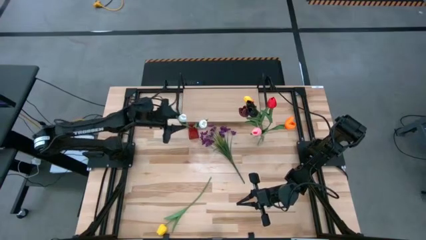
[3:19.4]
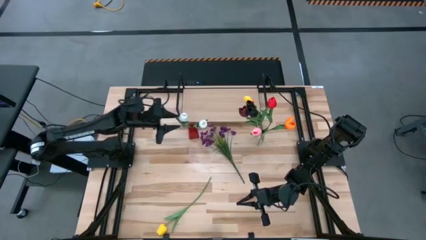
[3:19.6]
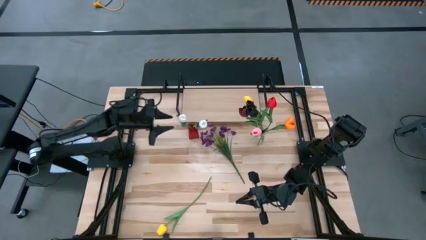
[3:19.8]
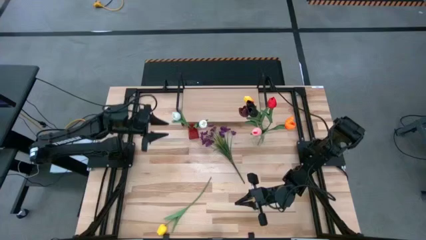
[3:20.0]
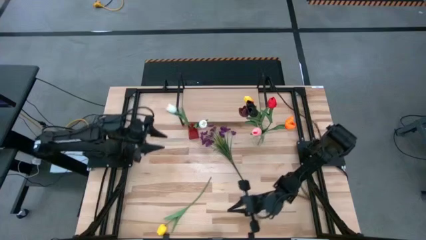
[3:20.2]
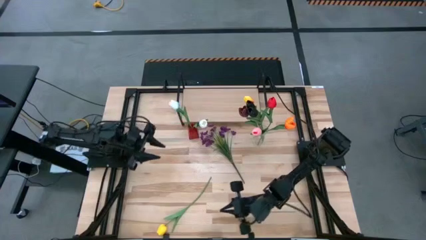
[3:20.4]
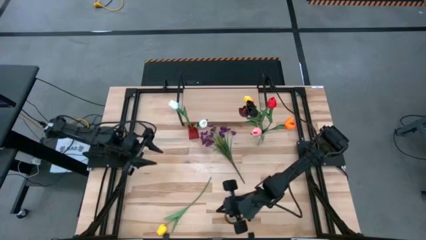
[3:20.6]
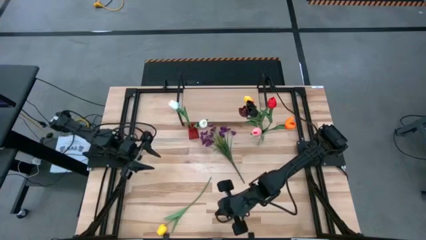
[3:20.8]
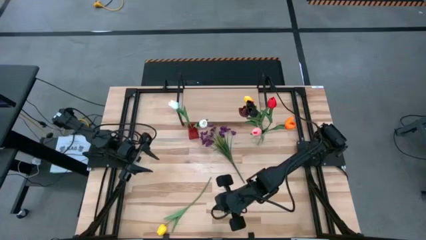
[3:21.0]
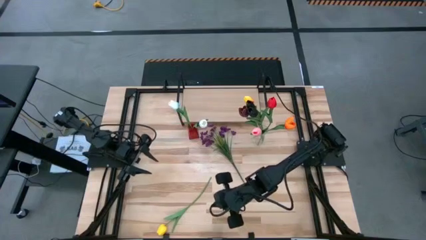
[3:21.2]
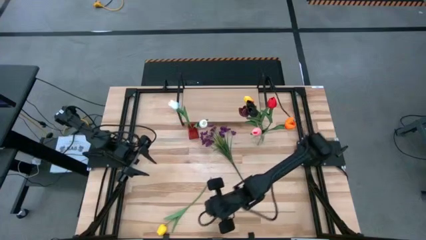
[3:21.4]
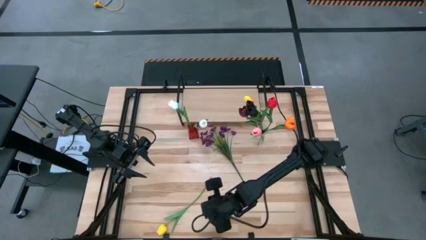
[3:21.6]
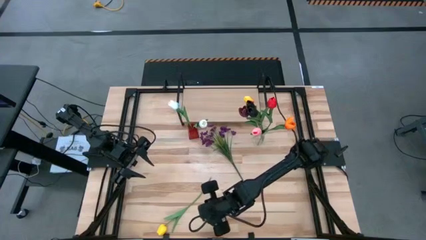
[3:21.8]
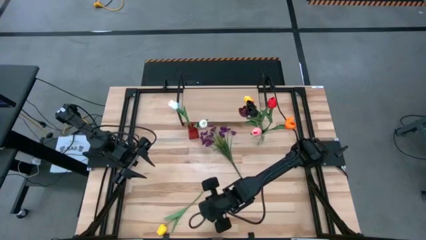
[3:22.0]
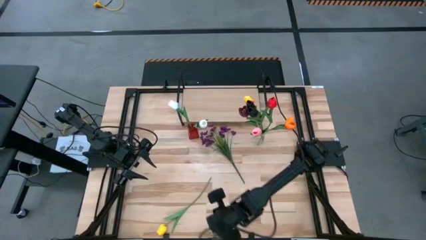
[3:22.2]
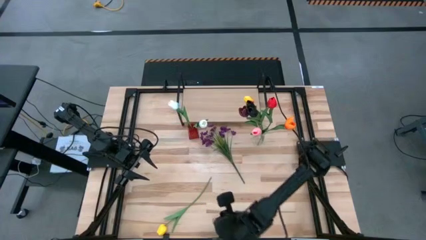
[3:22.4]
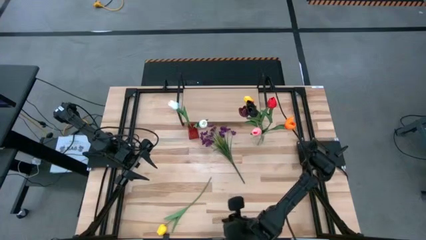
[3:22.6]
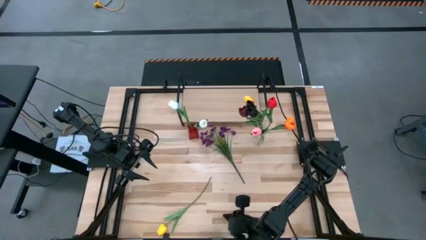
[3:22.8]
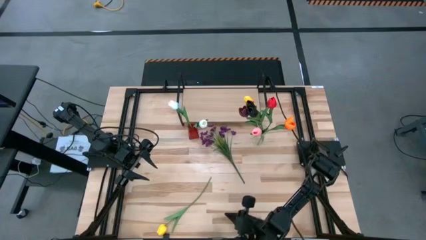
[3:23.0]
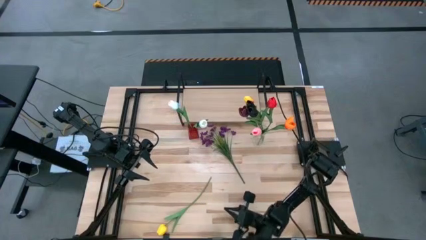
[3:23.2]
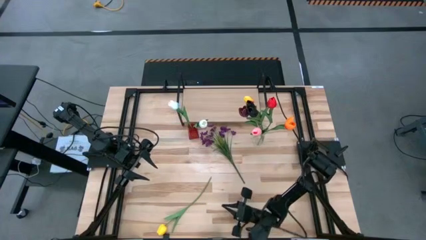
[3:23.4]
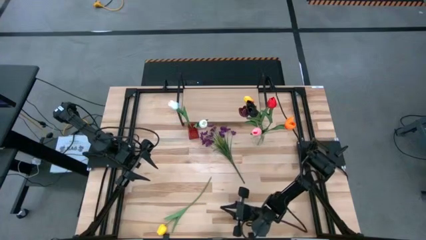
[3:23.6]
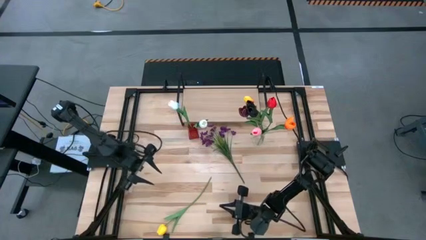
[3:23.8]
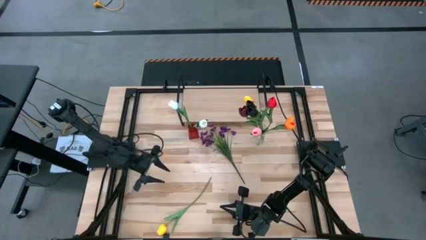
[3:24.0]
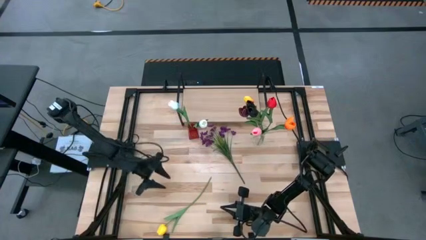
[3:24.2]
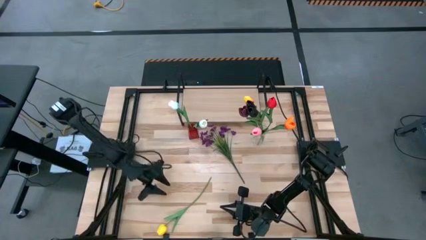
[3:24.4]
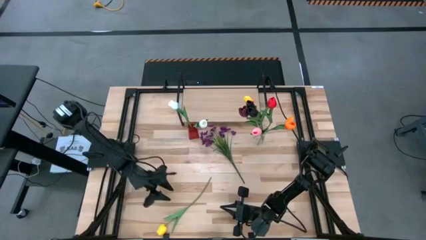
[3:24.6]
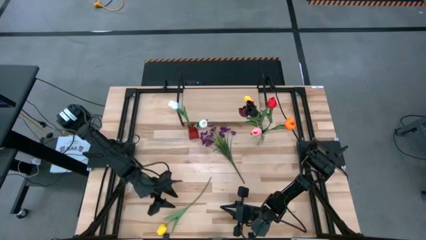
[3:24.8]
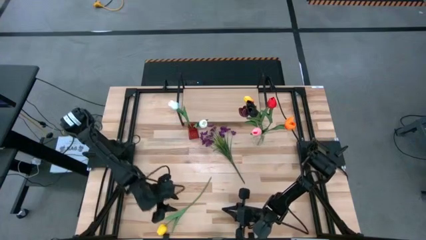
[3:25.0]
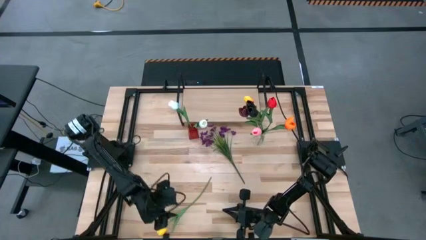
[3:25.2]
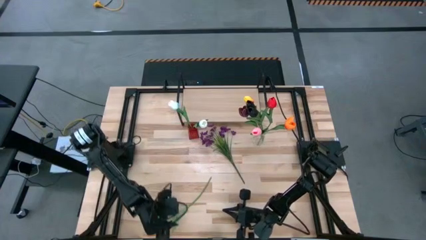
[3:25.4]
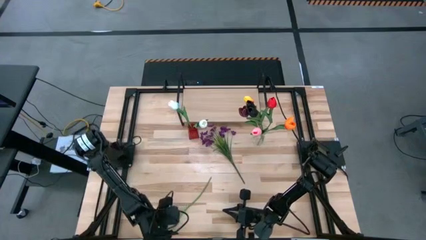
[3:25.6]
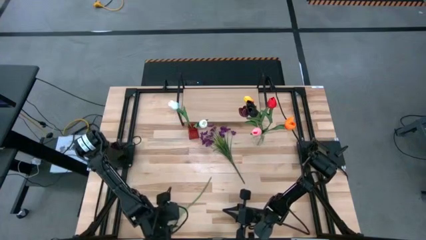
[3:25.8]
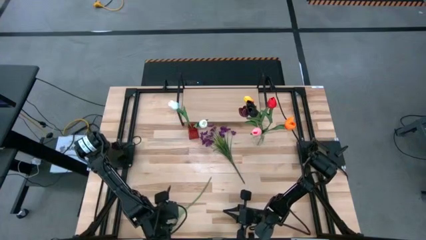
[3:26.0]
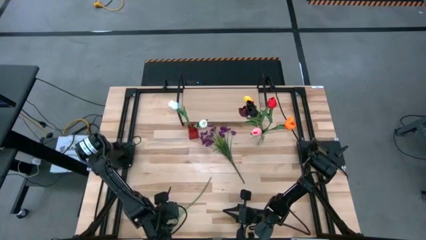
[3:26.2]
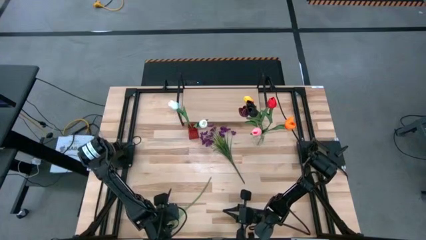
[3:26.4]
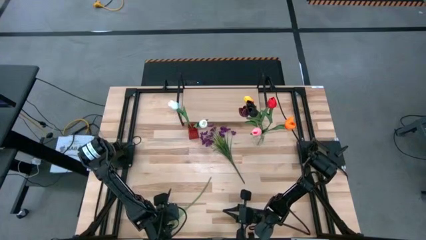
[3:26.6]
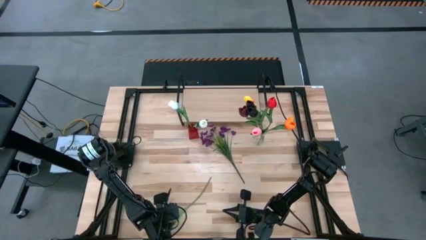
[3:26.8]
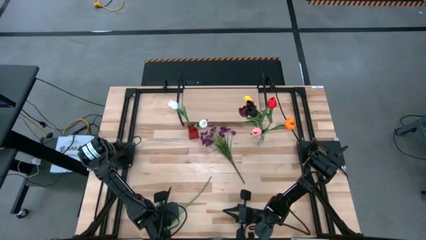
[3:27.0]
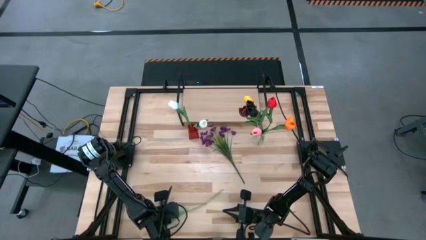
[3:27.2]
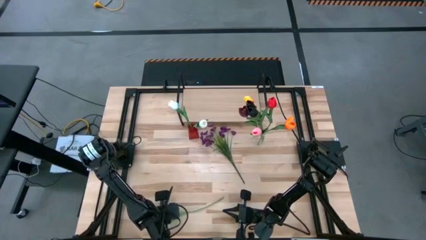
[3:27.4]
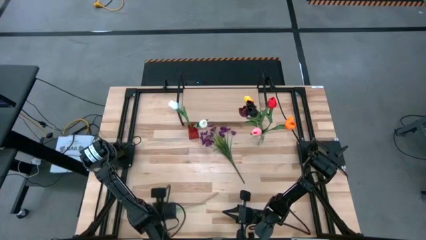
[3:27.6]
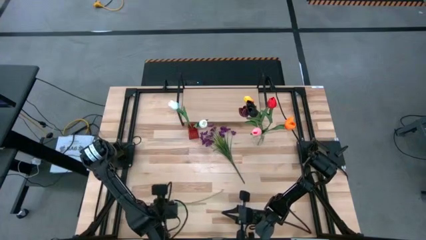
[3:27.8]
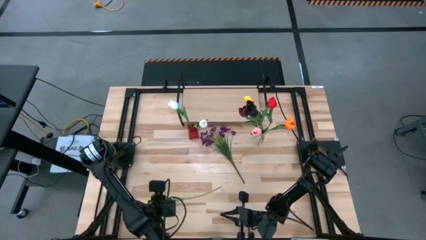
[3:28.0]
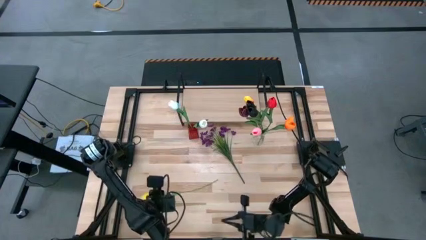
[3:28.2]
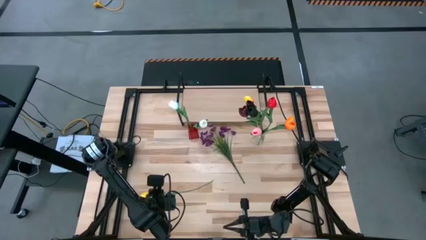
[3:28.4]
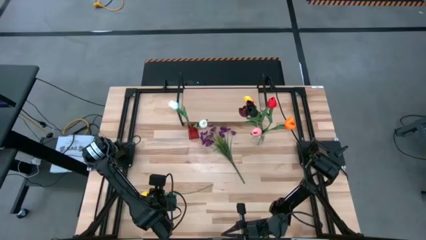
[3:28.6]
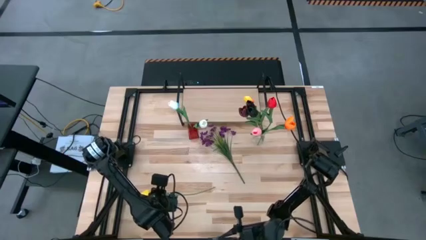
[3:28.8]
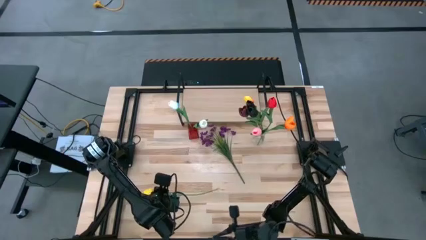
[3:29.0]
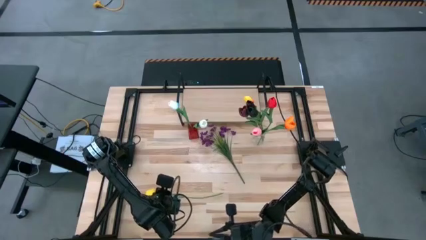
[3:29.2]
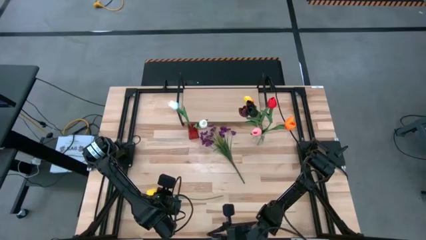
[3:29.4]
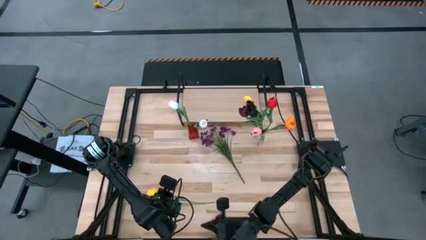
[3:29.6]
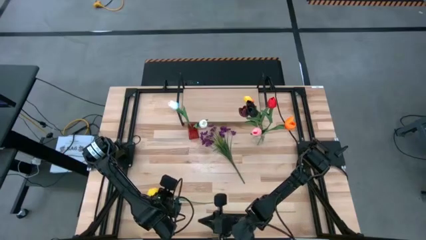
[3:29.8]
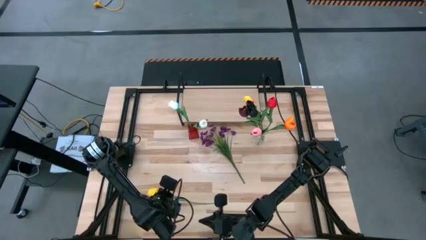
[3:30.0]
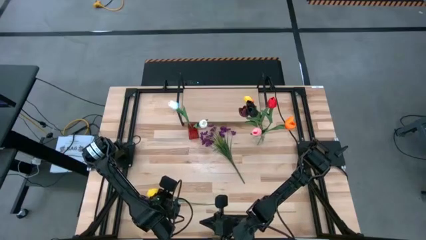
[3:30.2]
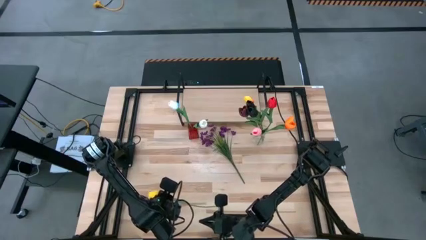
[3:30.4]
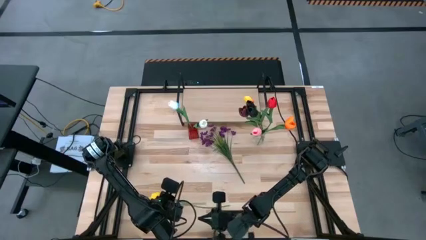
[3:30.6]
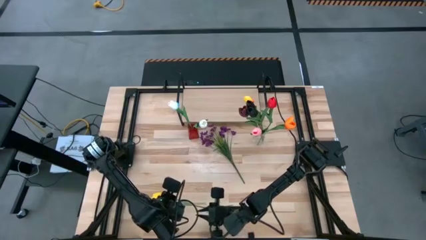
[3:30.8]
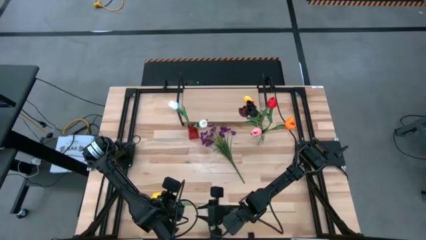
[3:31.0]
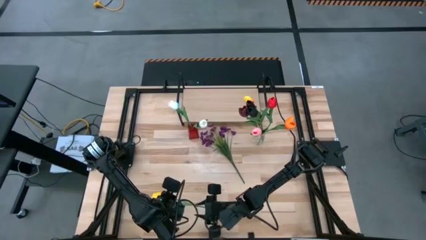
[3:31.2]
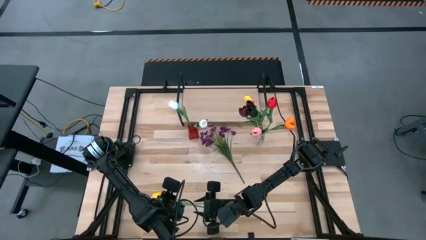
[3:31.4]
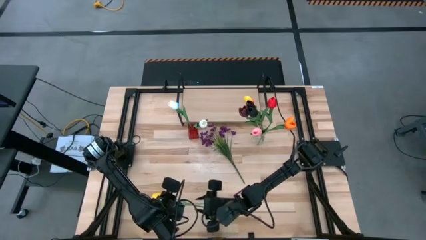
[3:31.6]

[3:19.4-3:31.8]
Task: Pick and place flowers into a vace then onto a shelf
Put the yellow flower into the red vase

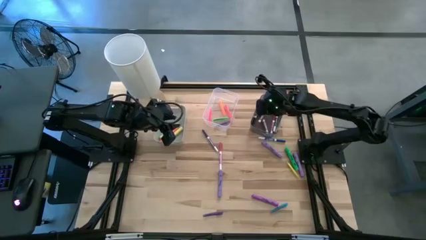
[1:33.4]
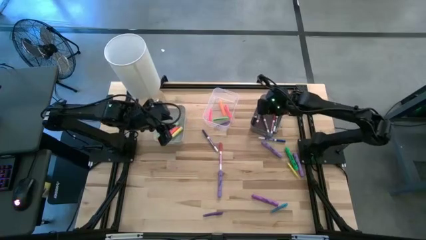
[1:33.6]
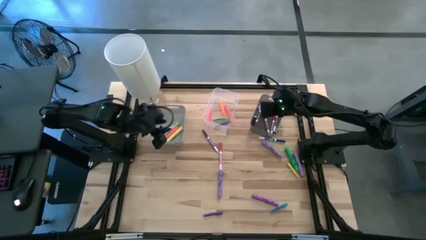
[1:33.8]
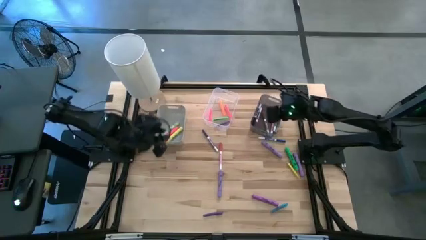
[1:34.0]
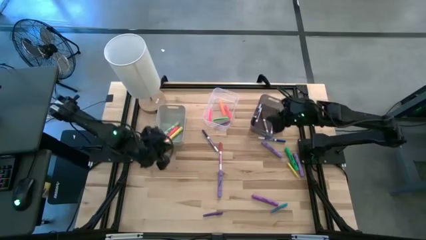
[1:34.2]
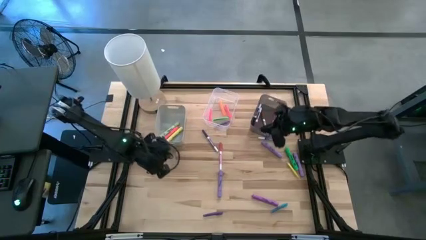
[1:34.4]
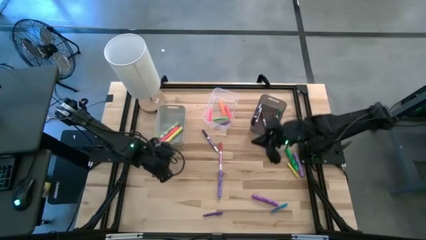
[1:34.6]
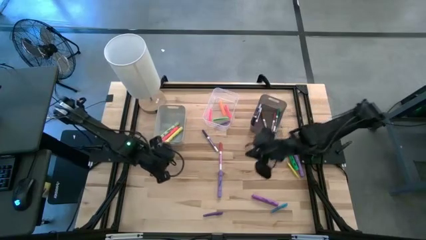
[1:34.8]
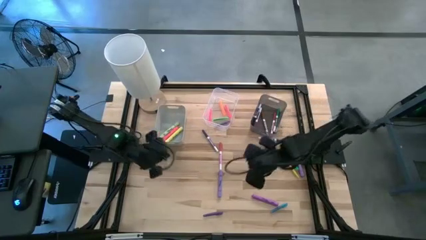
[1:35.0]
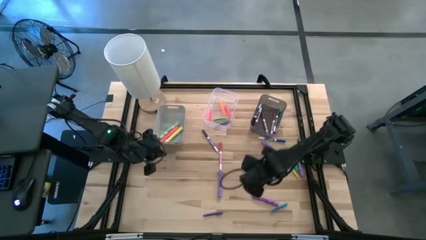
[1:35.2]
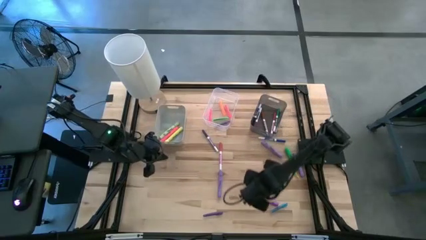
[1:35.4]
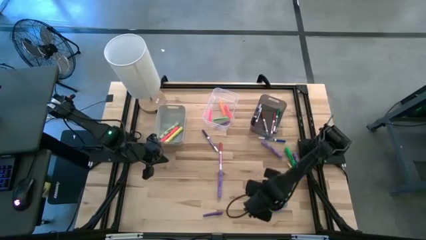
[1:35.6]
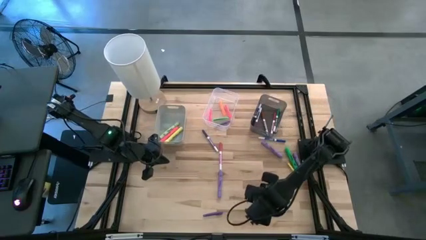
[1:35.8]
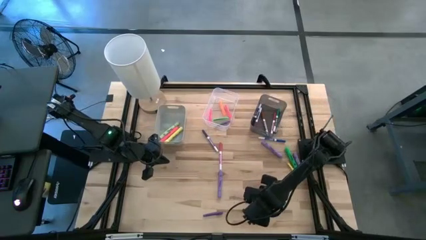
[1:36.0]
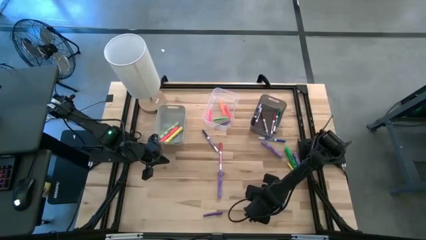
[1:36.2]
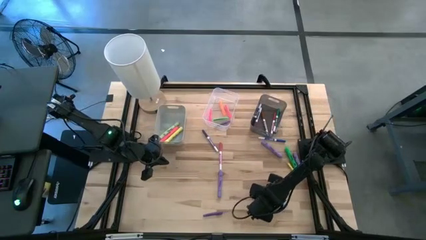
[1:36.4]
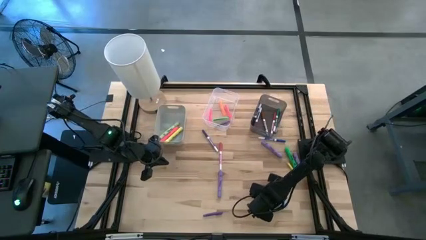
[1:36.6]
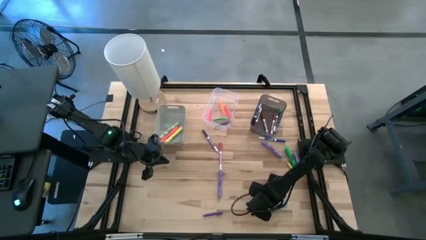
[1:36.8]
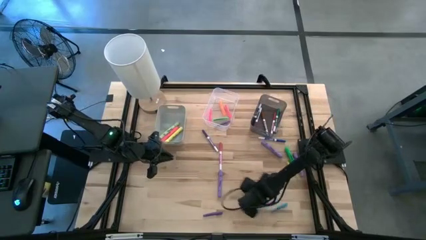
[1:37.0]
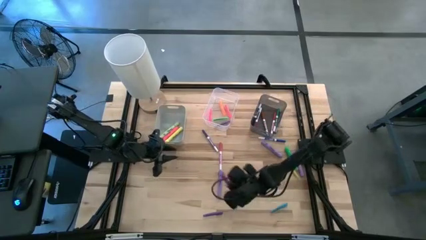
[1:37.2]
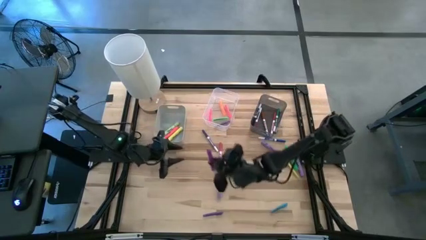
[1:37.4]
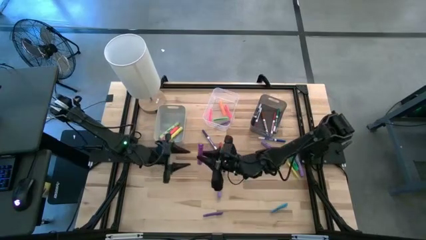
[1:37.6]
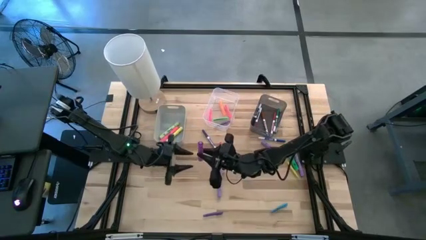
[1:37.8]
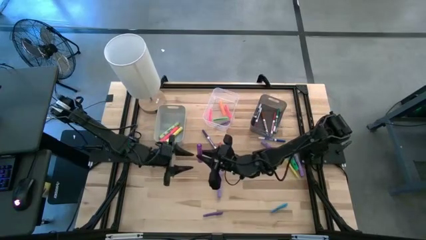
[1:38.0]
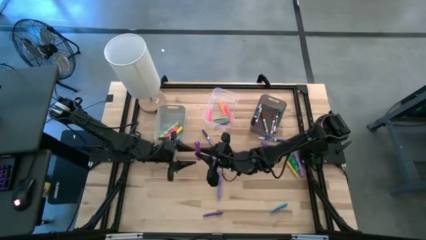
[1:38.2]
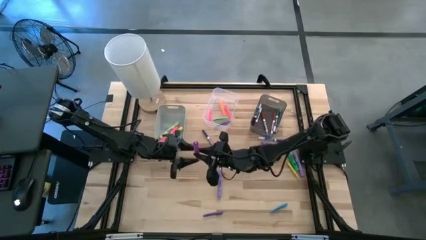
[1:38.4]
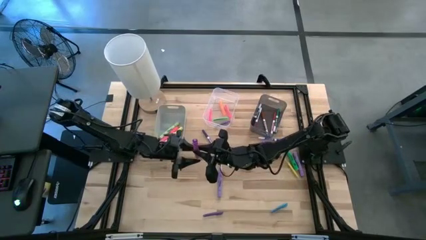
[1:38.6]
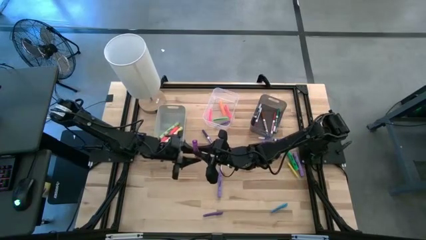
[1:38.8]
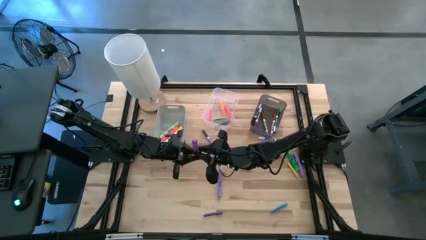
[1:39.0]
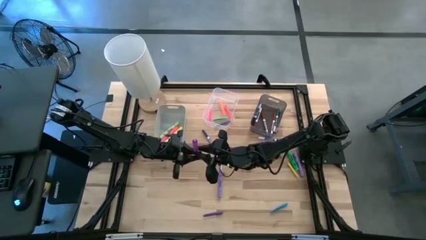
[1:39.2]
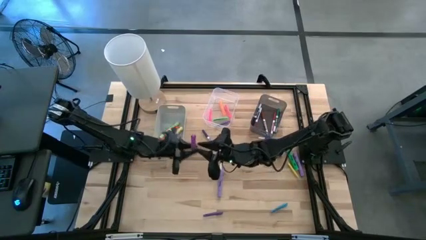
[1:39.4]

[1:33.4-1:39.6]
Task: Pick & Place Markers
Put the violet highlighter into the gray bin
